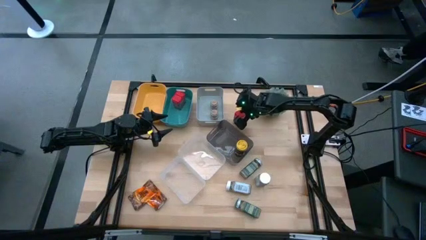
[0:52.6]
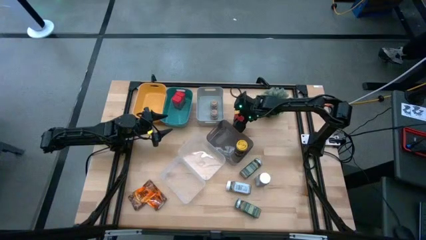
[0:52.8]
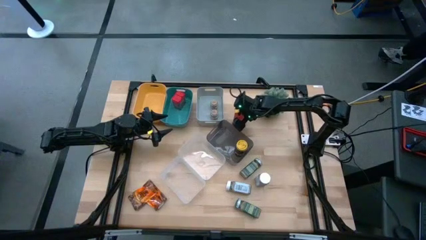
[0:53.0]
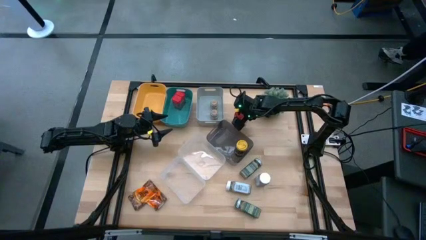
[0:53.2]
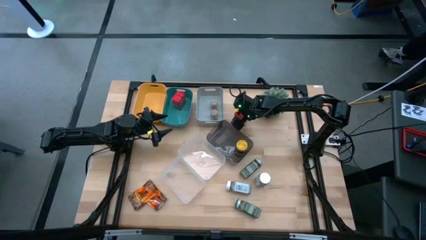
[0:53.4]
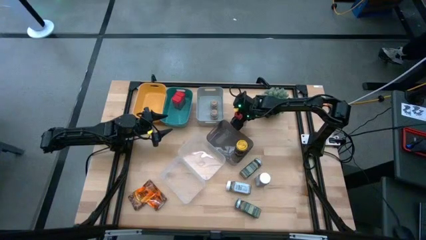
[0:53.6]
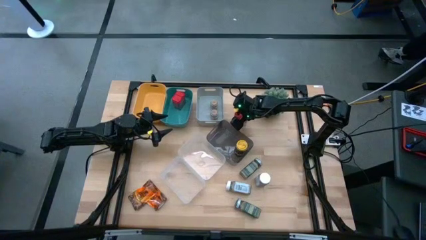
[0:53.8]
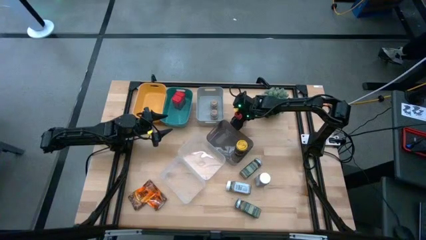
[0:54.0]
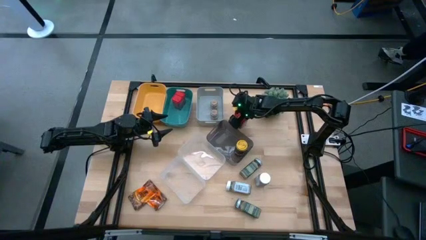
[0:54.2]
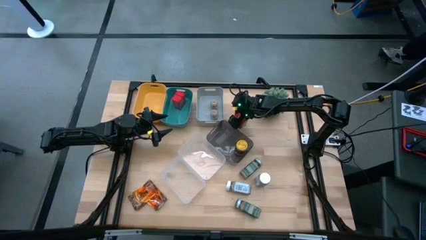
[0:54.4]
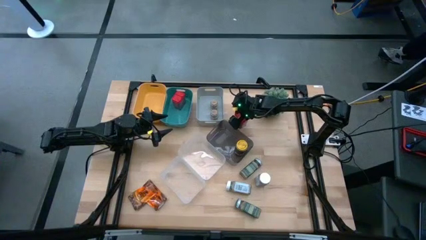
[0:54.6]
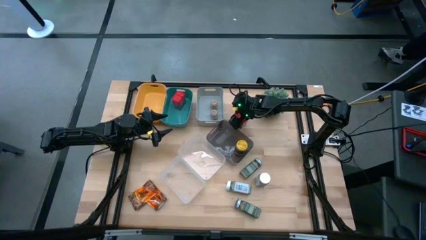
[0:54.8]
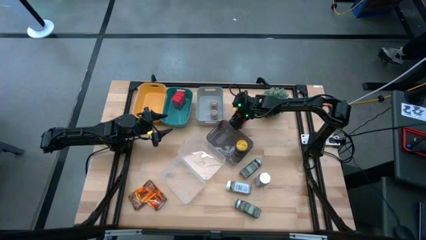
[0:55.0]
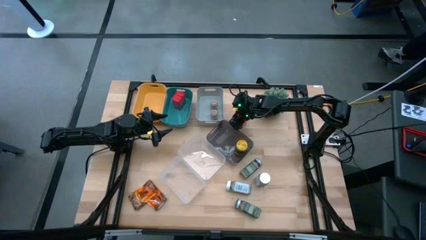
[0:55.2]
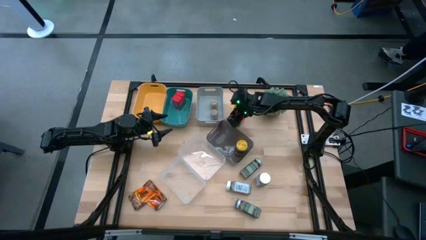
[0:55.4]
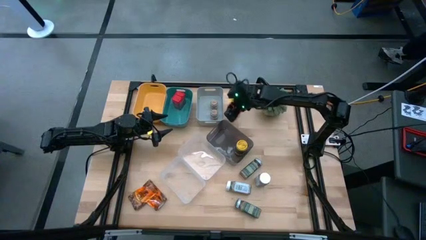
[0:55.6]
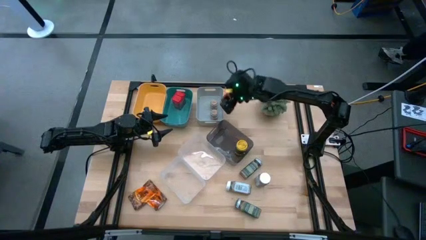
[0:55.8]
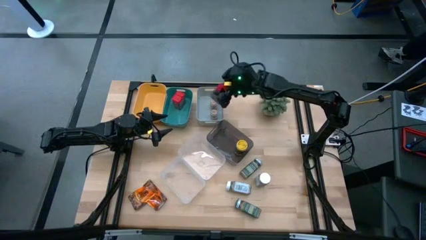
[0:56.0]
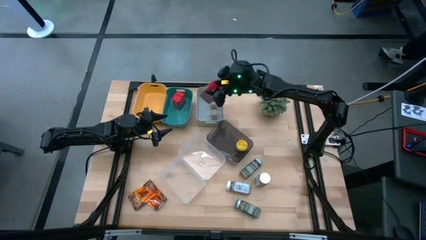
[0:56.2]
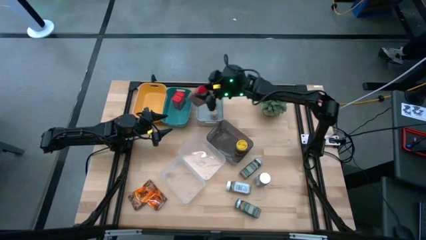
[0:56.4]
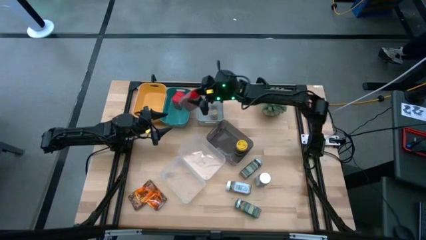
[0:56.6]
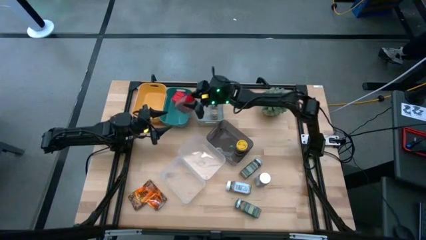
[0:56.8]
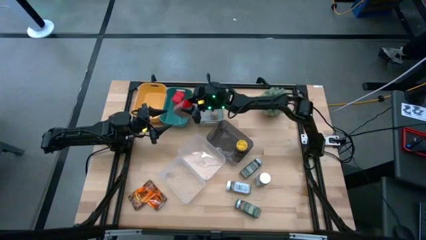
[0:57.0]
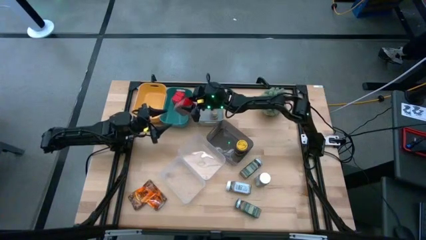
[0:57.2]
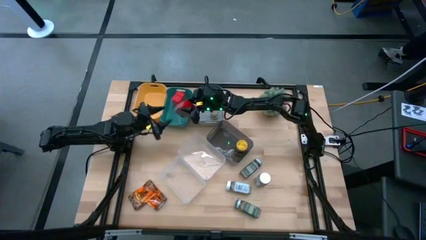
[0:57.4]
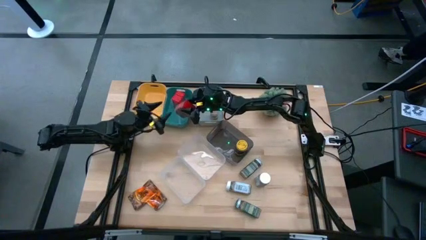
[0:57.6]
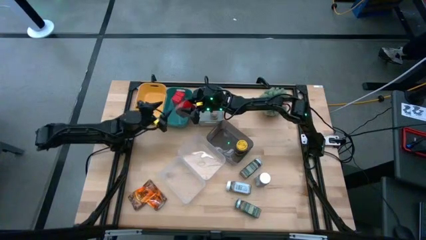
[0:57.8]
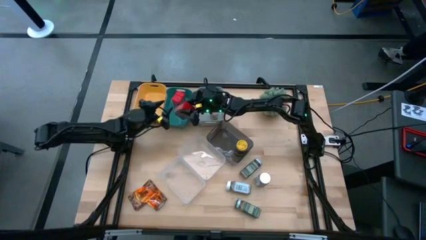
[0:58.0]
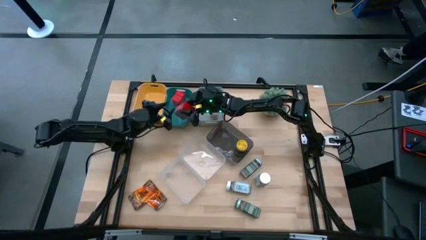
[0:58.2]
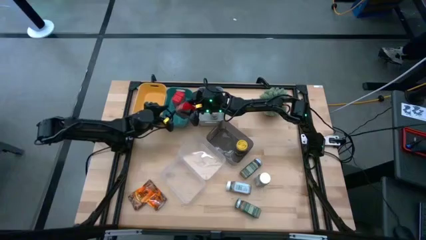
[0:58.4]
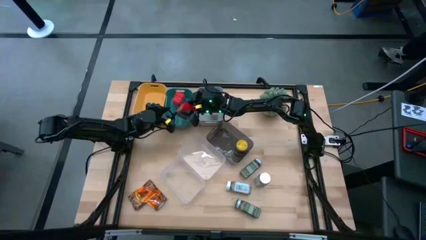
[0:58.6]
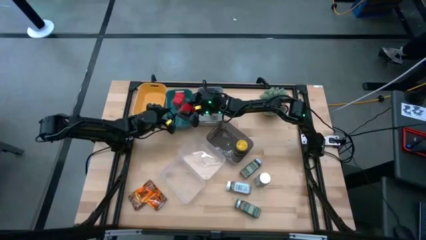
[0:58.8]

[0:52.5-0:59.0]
Task: Sort spices by type
Put the red seasoning can into the green bin

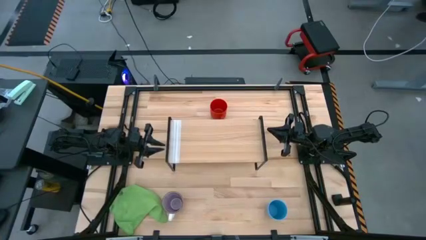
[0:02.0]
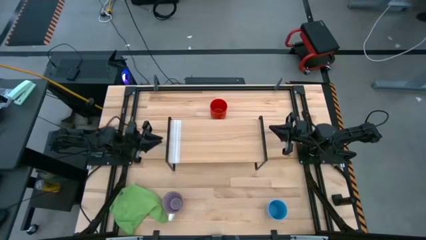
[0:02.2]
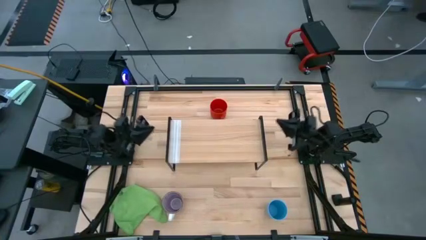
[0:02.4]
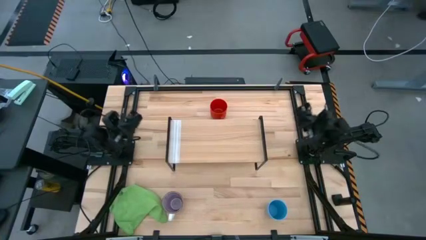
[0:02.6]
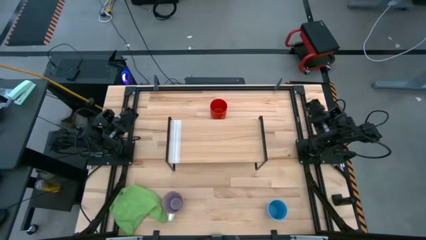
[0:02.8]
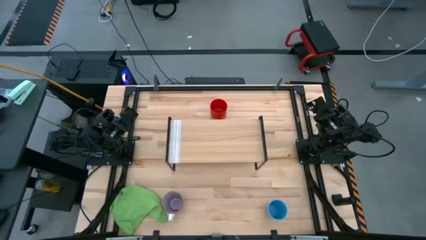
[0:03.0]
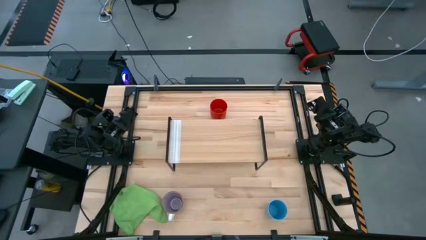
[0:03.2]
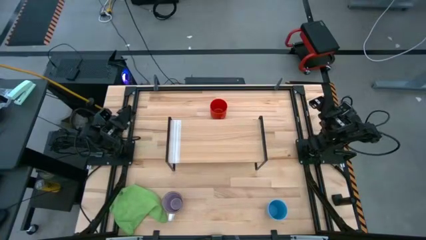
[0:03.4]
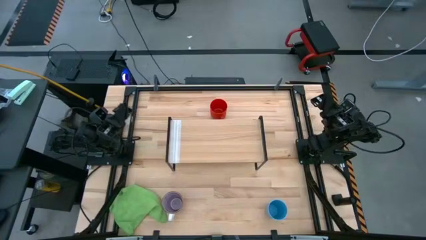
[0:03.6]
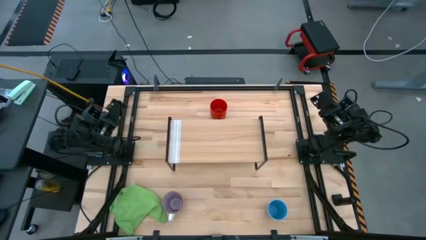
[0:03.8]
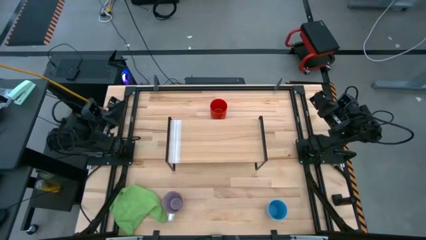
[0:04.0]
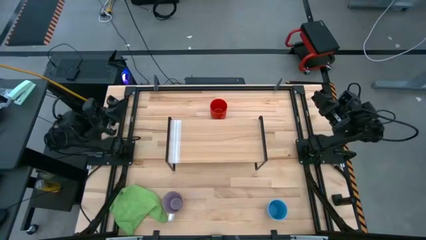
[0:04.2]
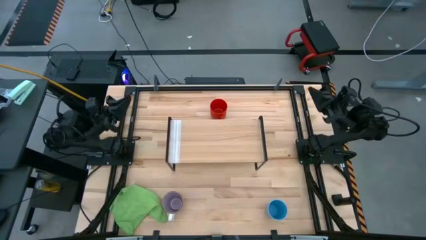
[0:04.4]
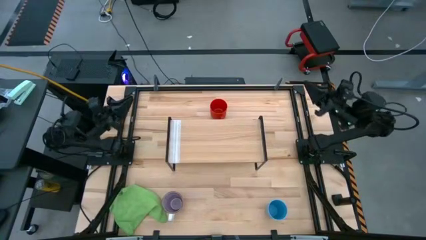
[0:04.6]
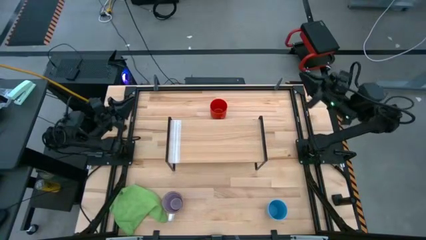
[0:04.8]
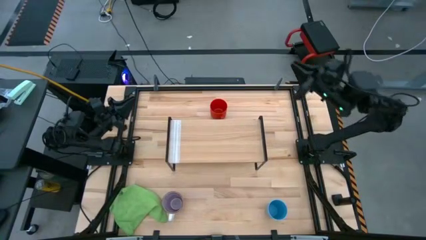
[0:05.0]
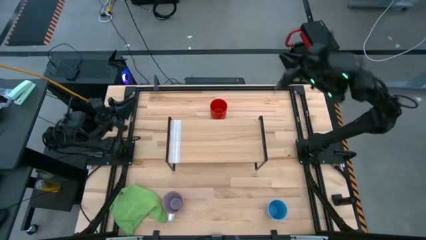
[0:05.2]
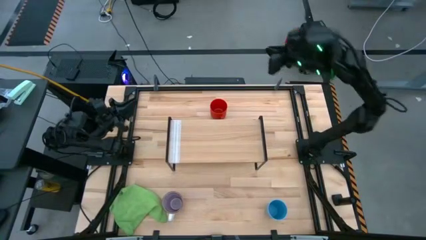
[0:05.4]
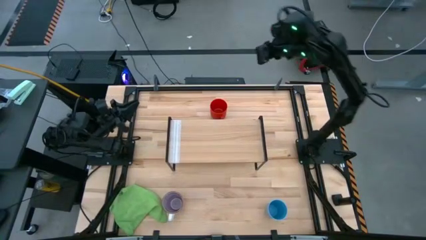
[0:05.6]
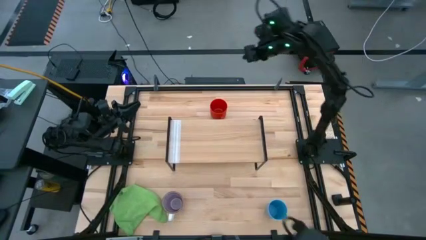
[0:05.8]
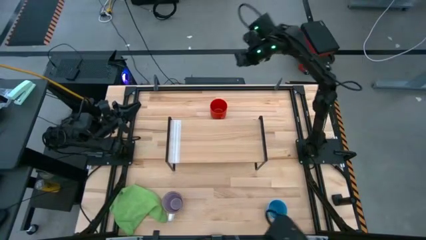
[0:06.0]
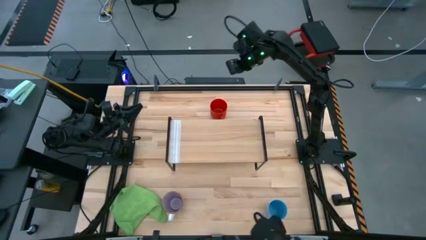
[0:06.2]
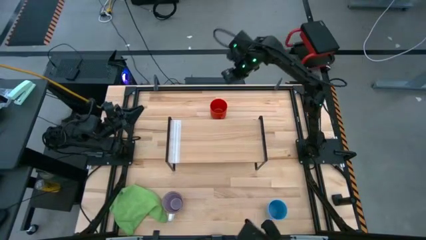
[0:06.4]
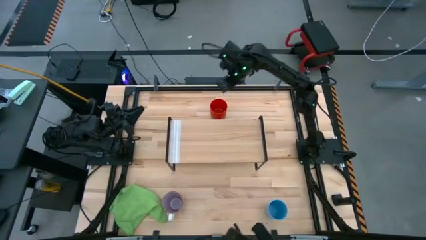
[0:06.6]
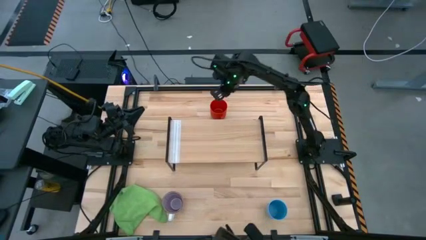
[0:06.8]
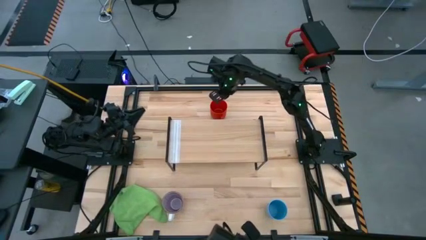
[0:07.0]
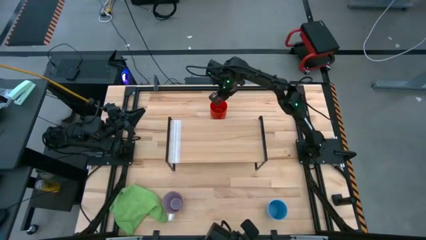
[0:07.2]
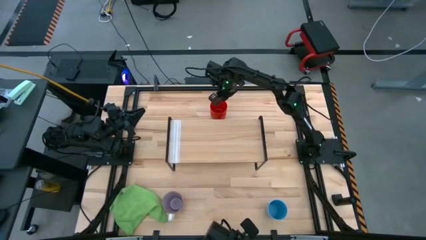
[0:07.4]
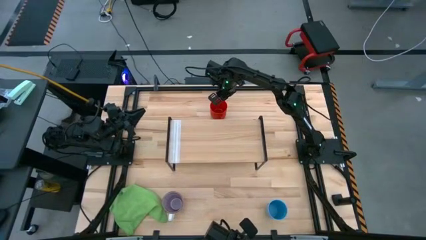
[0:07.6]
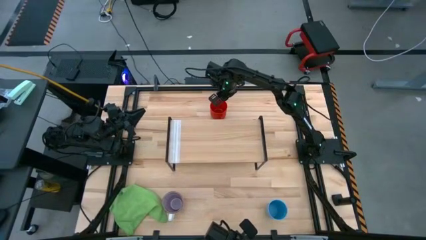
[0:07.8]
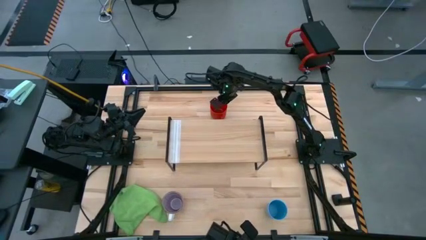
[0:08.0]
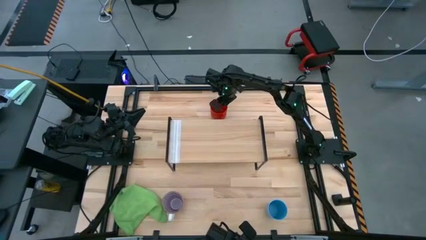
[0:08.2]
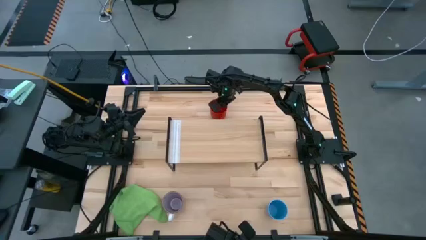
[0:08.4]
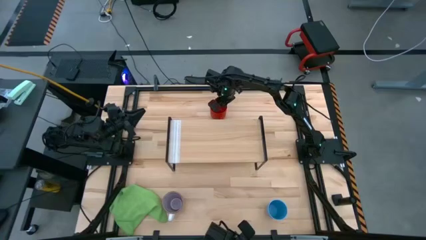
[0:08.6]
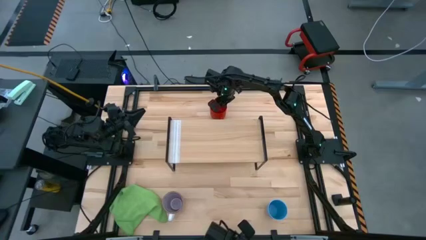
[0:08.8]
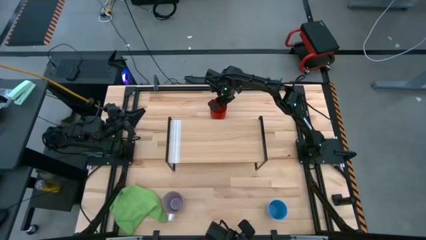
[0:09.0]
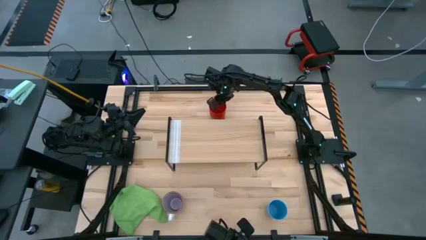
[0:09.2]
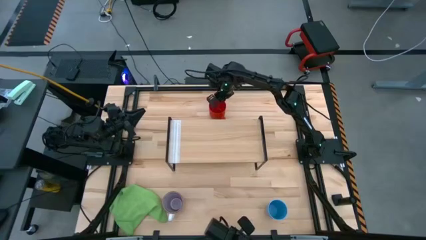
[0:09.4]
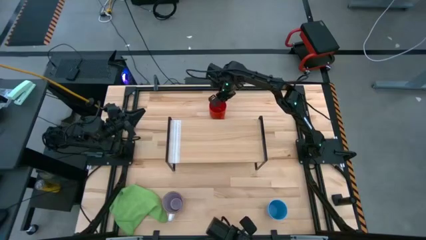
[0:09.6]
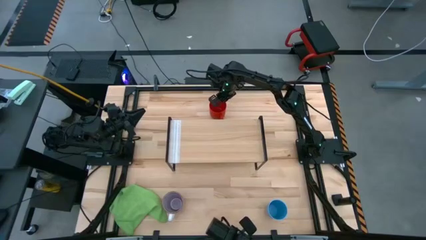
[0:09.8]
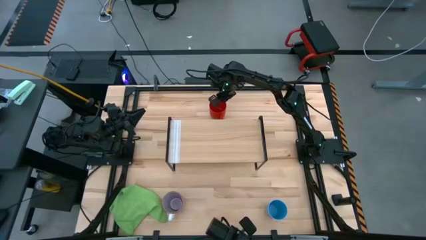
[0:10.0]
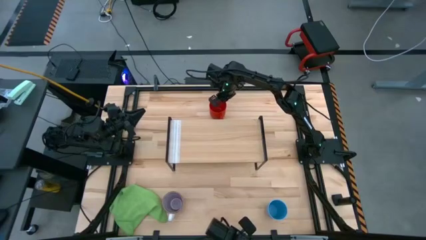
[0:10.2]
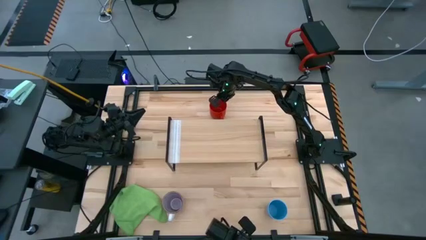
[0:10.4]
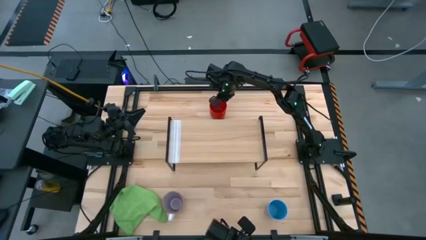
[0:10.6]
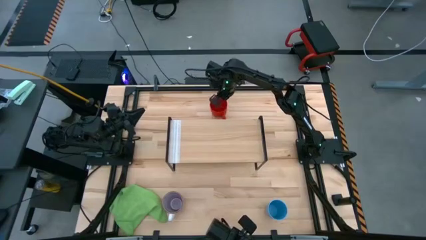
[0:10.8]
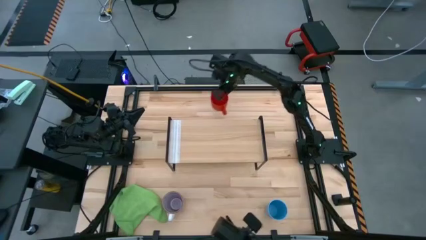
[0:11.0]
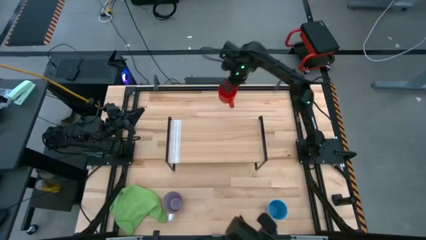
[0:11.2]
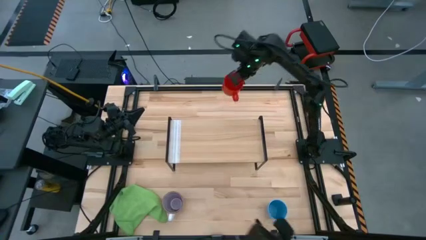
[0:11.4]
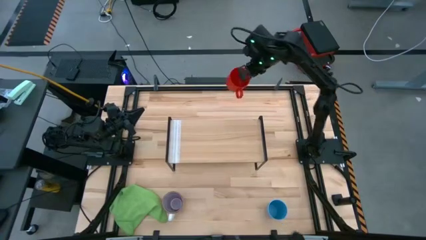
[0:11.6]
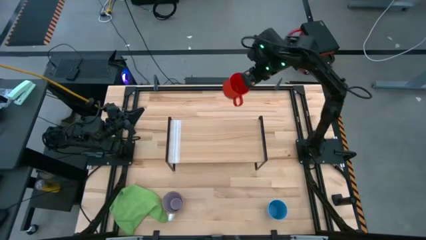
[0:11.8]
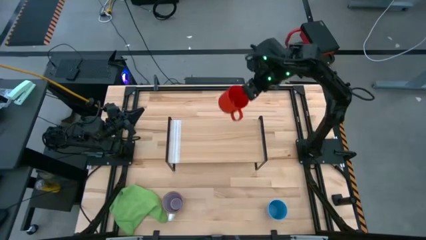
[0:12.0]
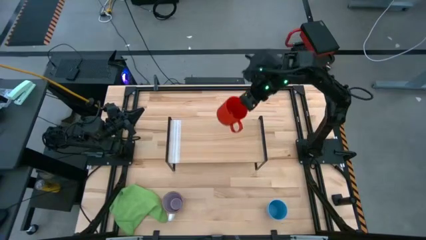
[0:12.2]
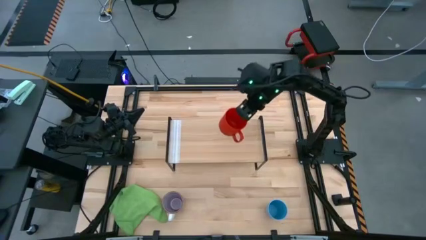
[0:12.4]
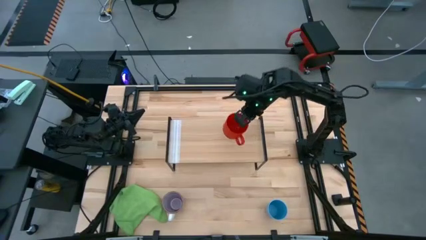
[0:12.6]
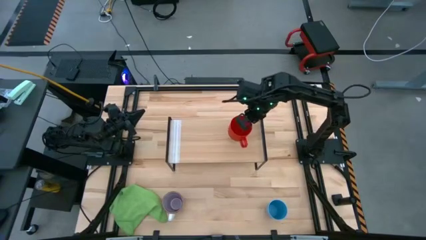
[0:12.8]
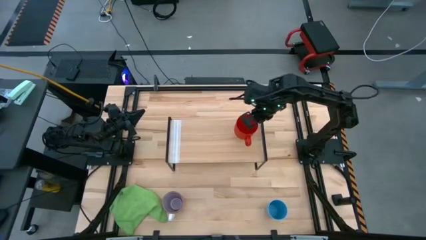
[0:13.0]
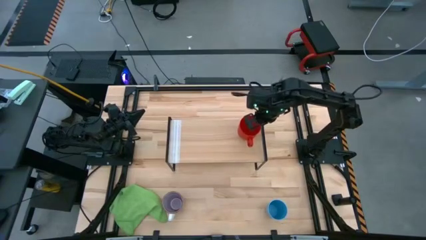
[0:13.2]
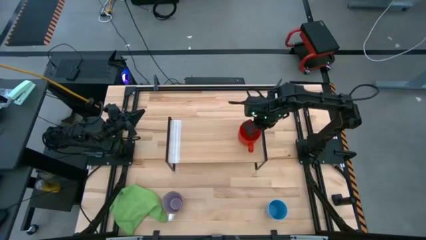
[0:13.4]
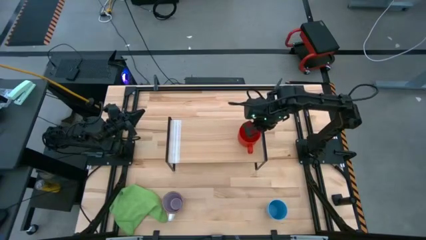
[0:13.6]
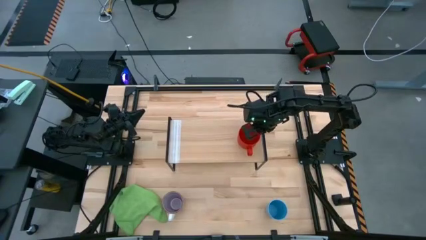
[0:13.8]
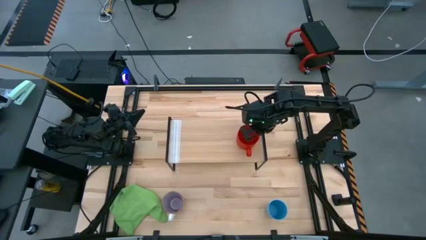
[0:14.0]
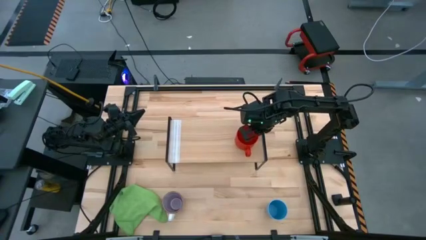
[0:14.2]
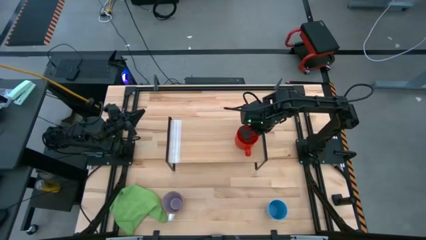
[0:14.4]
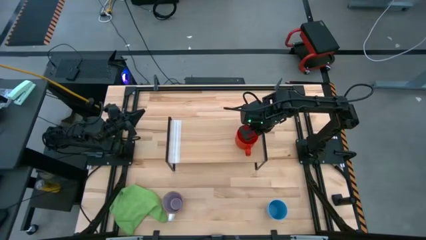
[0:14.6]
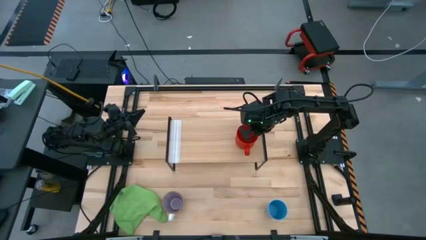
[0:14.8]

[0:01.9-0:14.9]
Task: Stack small to large cups/mugs on shelf
Put the red mug on the shelf
